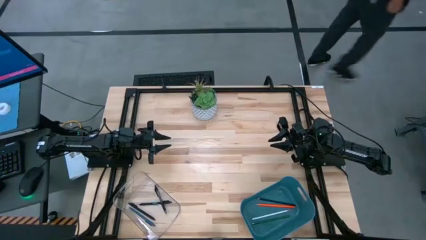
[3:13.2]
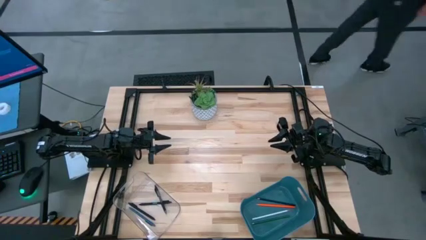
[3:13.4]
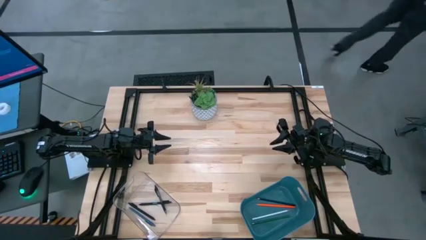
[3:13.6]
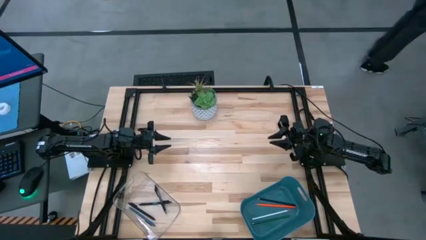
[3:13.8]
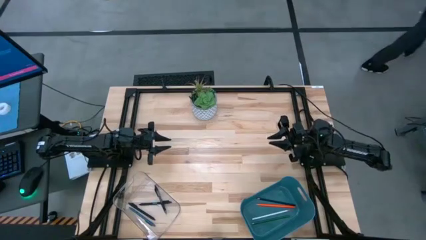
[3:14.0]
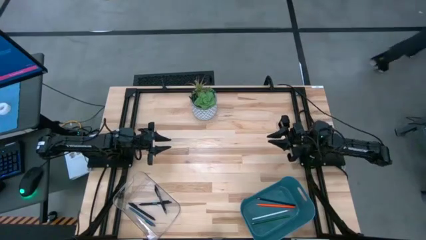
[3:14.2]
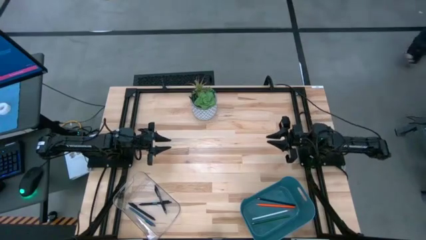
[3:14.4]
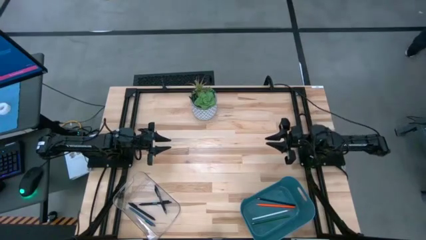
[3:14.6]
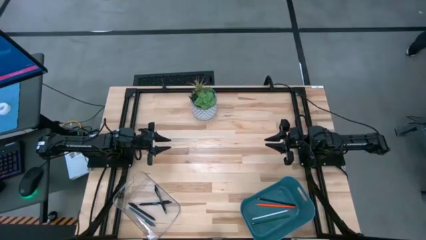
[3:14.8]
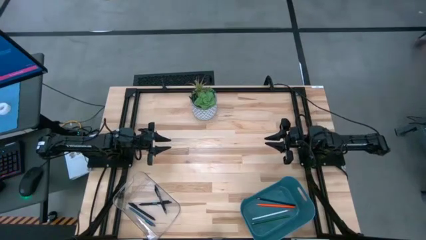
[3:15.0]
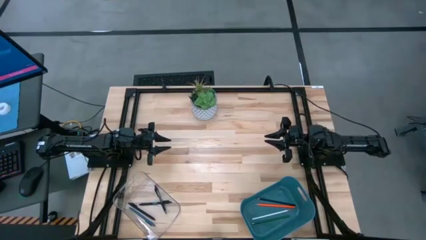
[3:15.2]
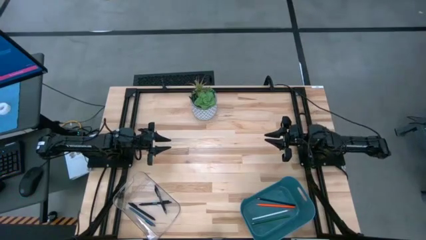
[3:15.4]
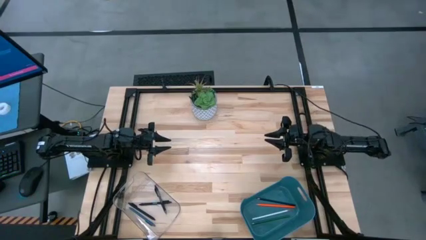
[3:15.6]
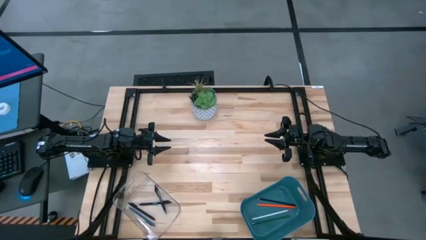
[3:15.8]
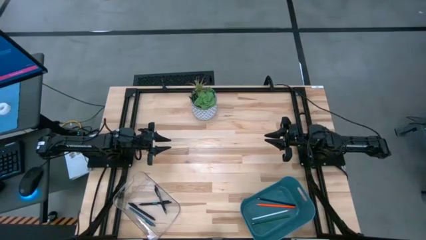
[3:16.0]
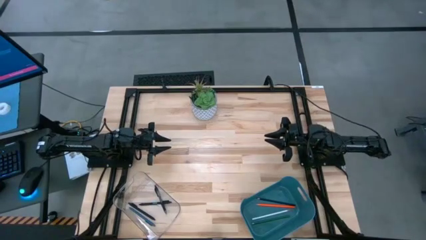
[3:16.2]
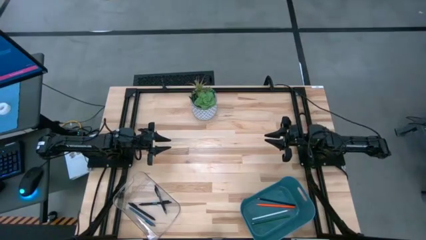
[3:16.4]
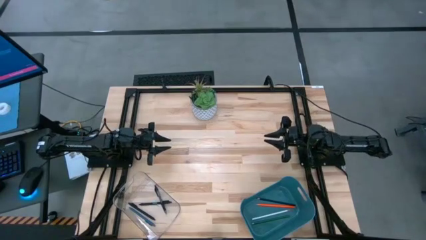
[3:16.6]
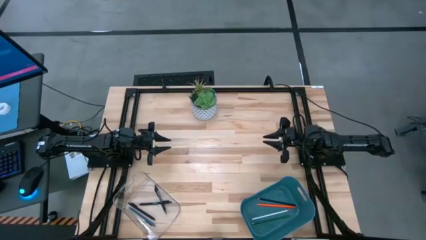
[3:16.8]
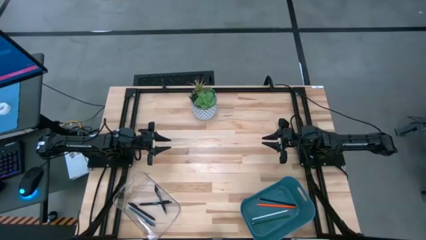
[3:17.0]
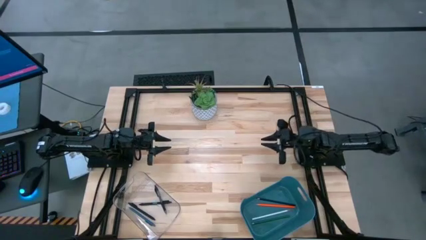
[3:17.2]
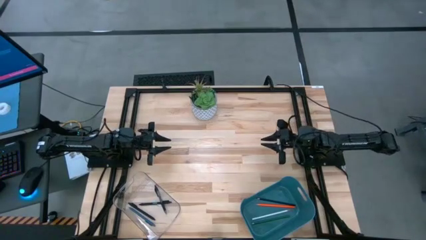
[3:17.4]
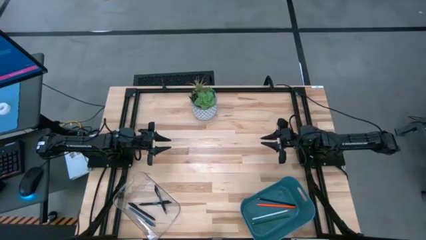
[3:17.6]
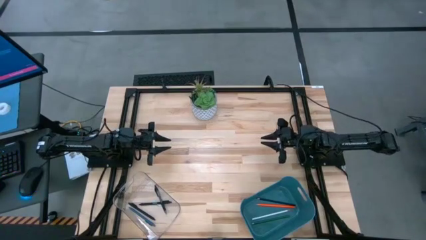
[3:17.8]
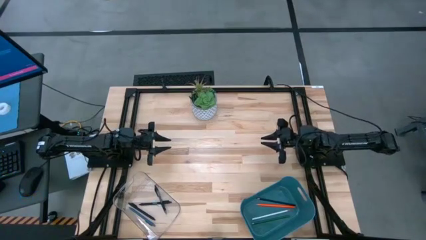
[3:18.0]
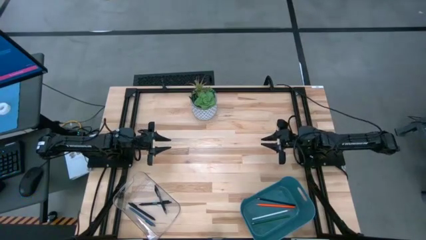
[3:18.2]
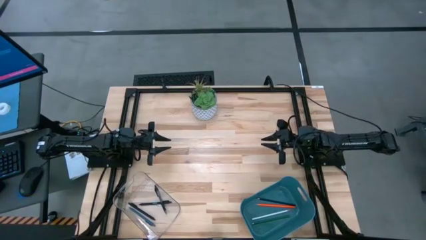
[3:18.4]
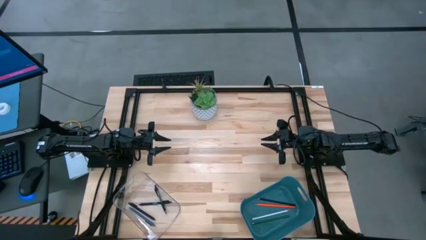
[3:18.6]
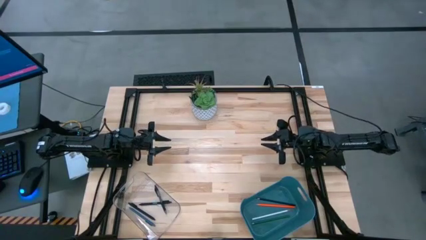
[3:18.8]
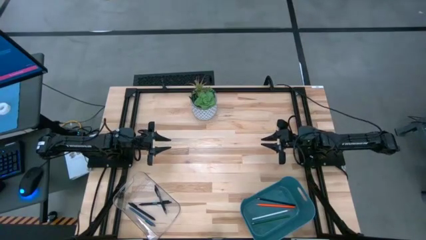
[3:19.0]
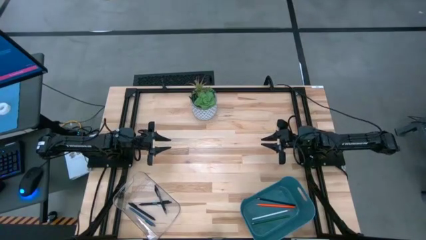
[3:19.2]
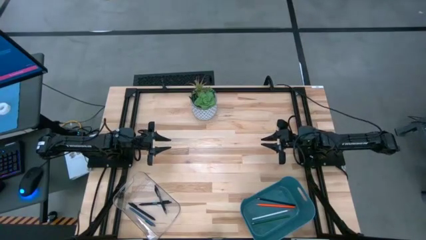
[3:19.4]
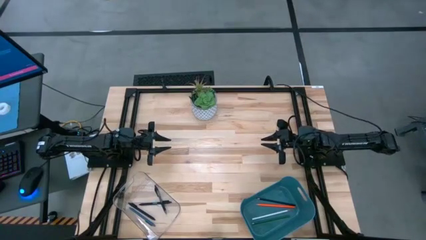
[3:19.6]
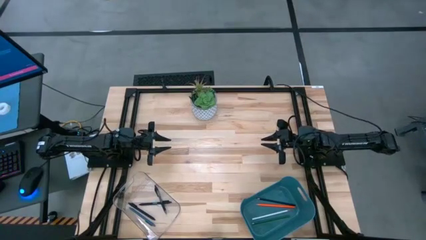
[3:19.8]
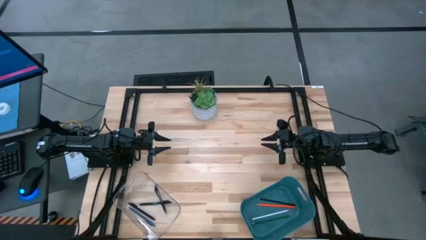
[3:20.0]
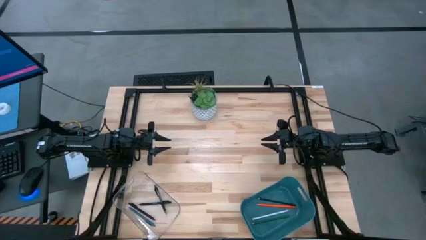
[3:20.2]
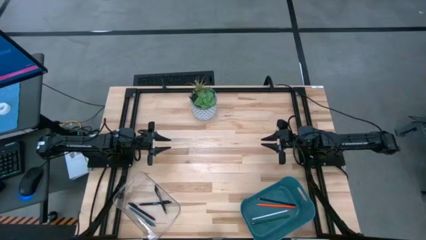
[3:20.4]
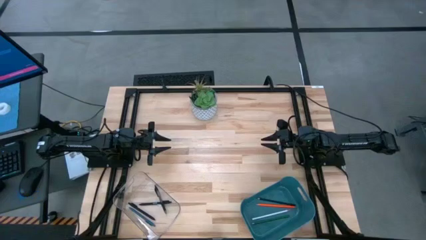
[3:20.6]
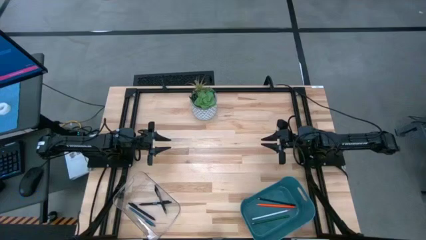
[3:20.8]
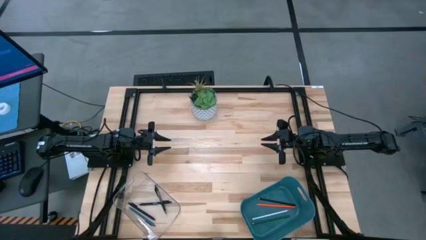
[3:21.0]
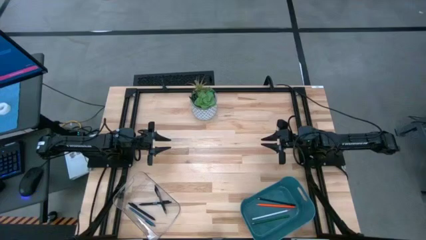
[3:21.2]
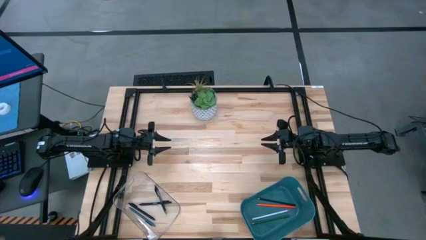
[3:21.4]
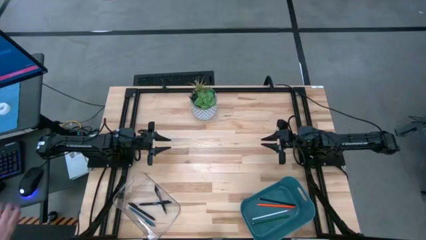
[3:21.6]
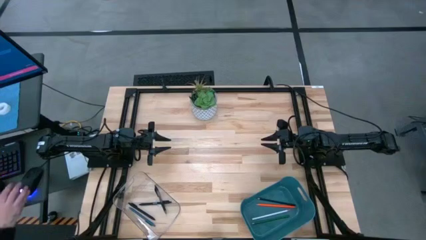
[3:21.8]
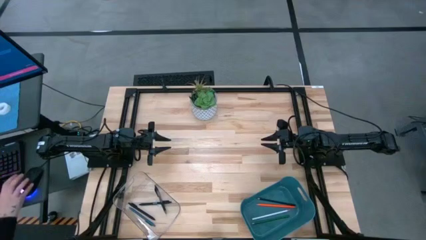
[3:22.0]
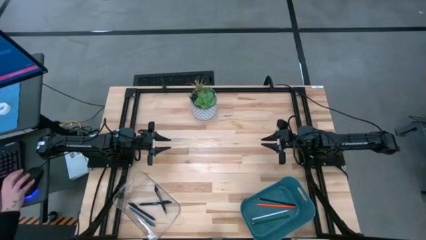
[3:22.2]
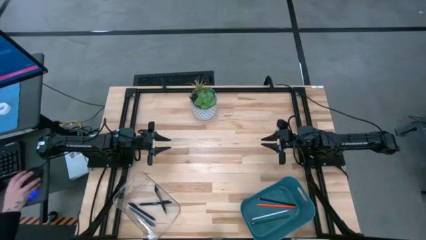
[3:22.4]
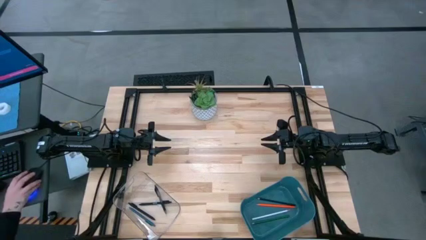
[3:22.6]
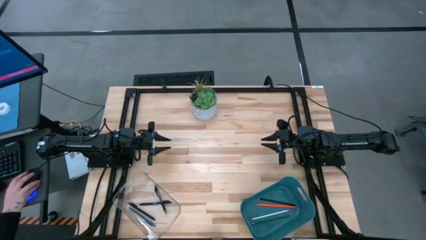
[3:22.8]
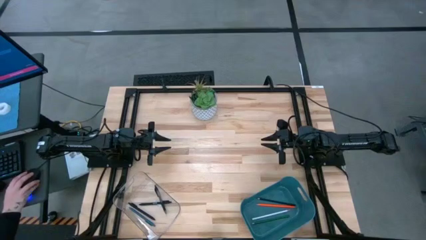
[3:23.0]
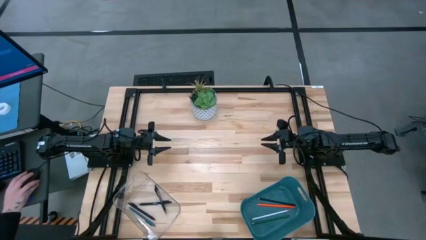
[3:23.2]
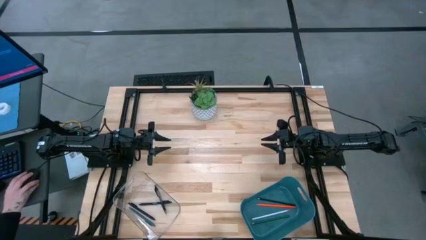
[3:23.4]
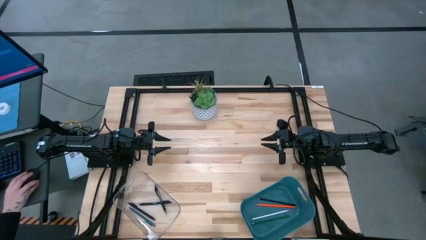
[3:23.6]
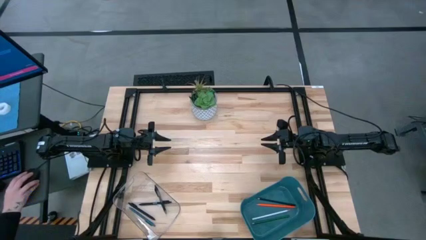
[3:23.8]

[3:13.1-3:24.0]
Task: Sort pens & pencils
Return to Home Position

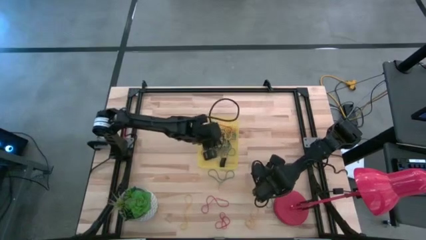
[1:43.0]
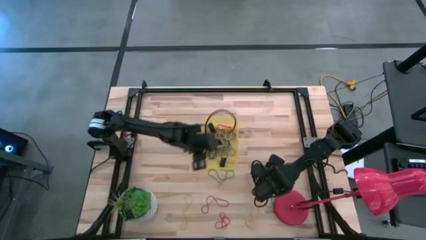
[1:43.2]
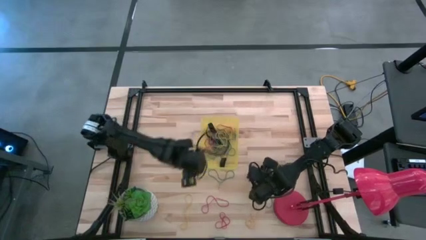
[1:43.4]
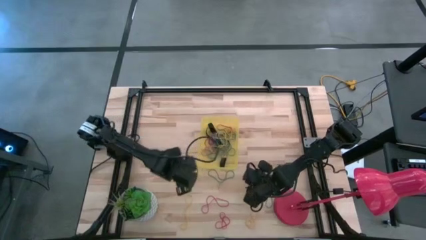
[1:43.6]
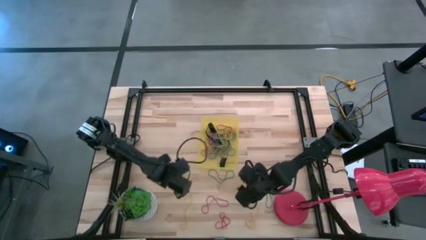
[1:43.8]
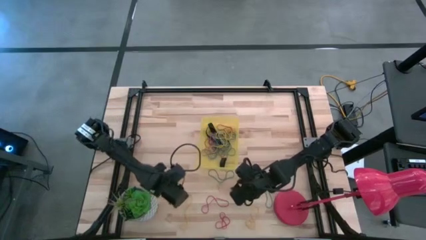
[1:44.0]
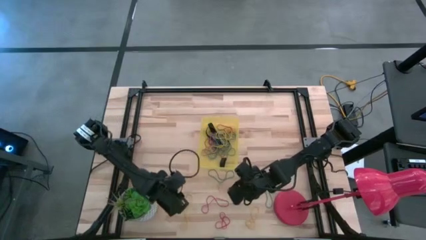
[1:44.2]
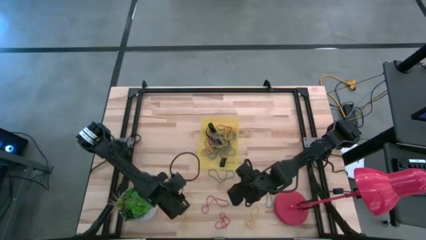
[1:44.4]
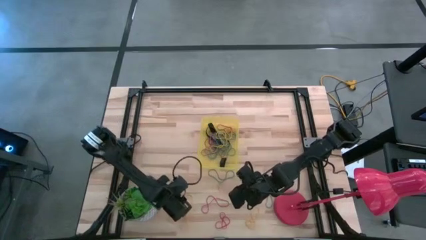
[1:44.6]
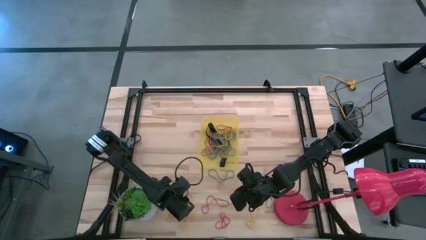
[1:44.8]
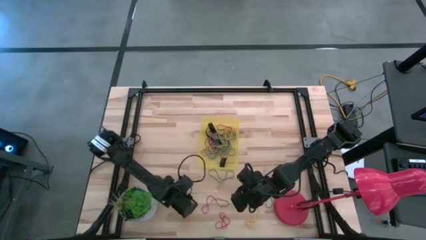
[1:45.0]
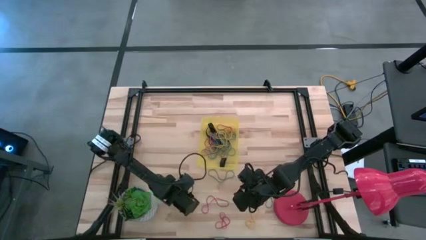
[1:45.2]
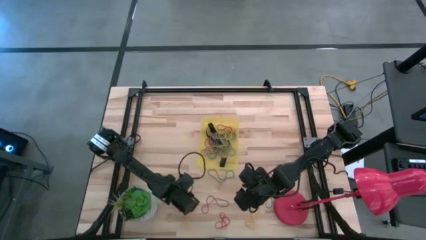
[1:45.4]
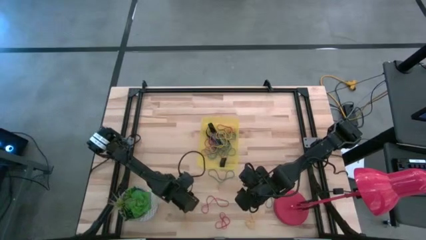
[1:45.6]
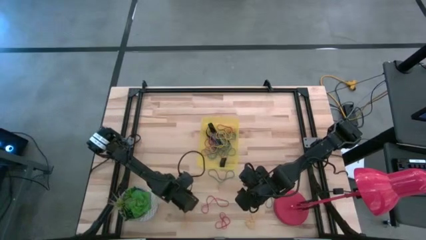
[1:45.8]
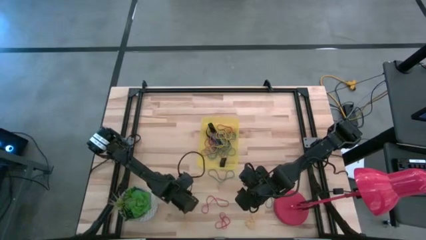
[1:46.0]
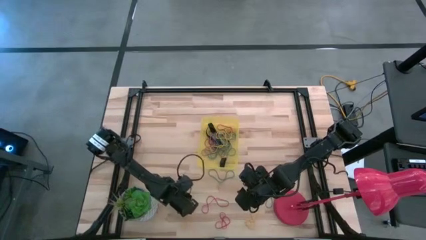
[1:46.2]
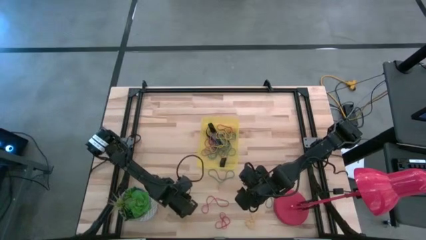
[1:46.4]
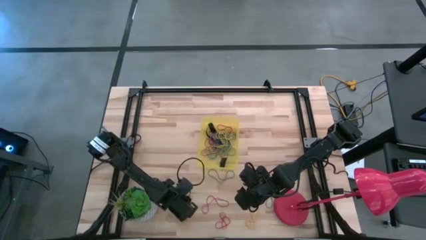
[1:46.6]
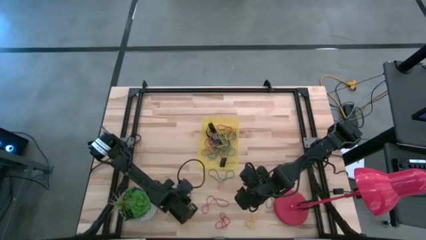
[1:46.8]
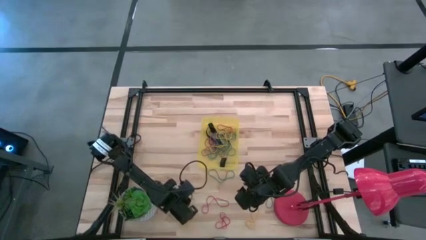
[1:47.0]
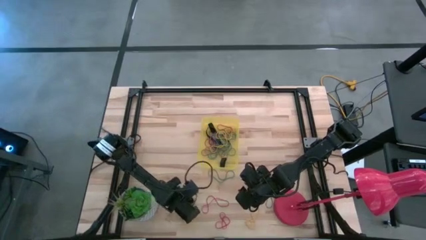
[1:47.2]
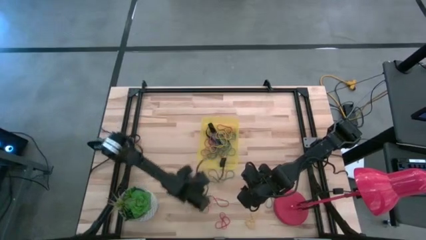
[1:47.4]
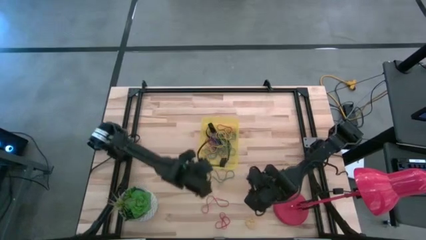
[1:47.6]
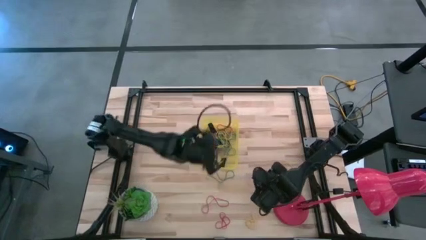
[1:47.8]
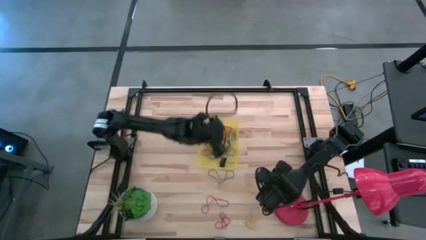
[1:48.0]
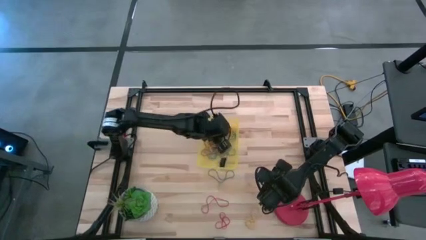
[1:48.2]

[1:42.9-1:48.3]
Task: Pick and place rubber bands into bin
Put the yellow rubber band into the yellow bin
